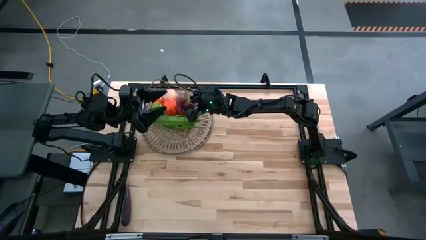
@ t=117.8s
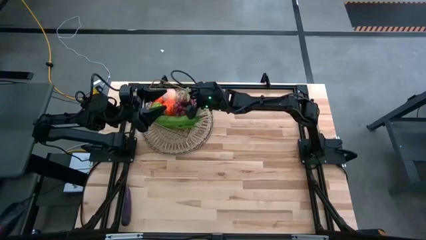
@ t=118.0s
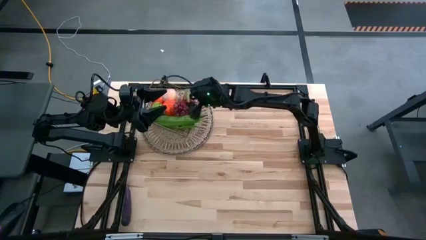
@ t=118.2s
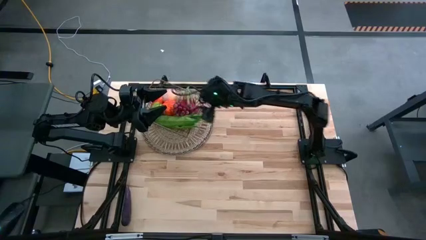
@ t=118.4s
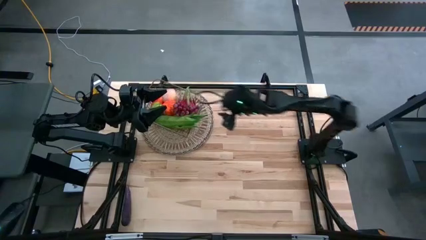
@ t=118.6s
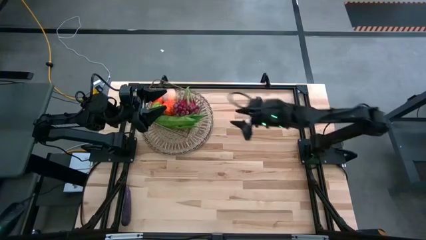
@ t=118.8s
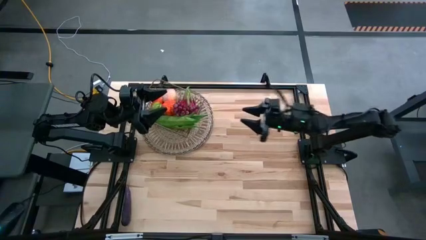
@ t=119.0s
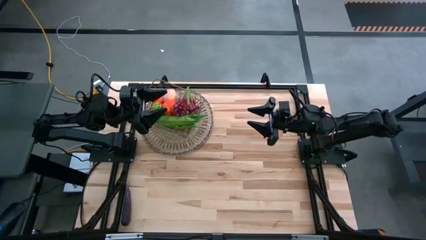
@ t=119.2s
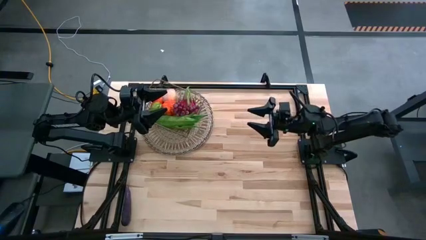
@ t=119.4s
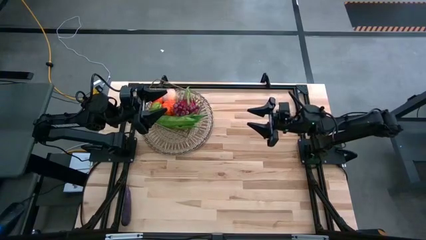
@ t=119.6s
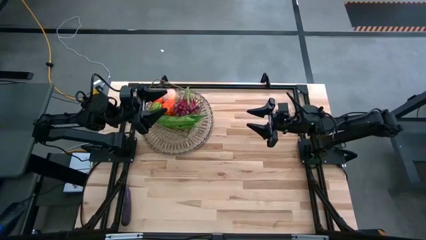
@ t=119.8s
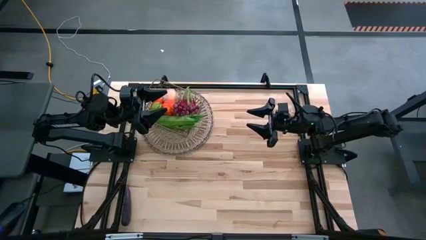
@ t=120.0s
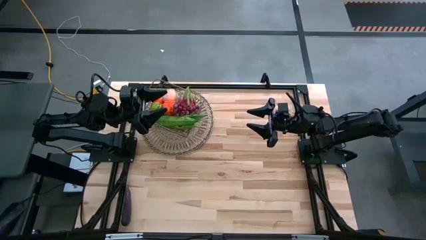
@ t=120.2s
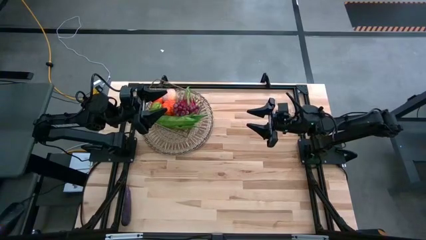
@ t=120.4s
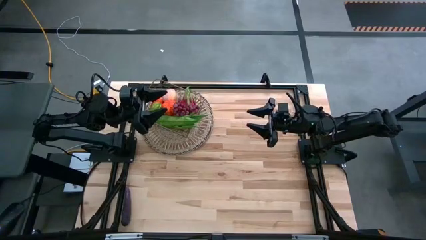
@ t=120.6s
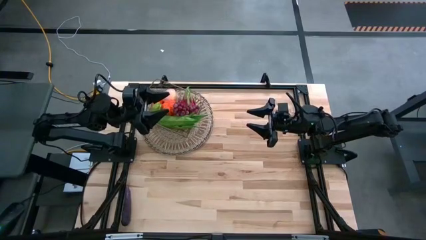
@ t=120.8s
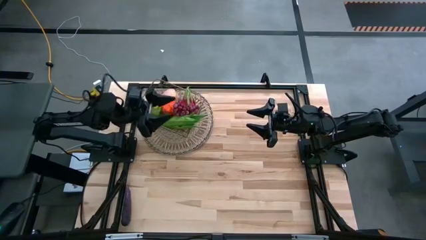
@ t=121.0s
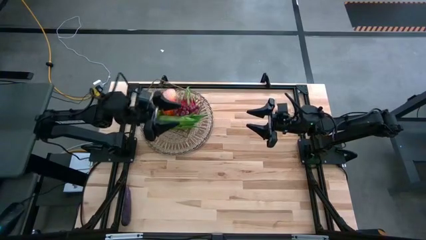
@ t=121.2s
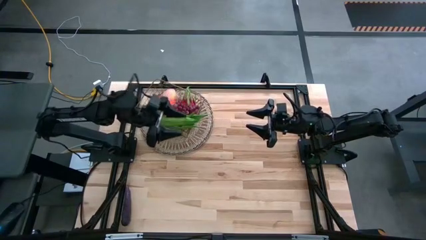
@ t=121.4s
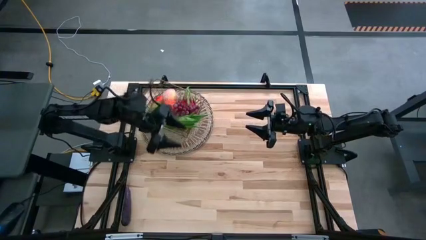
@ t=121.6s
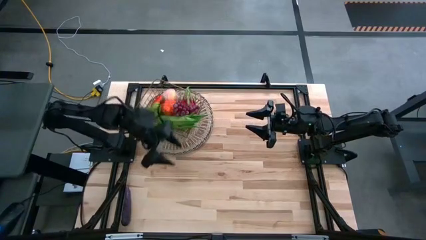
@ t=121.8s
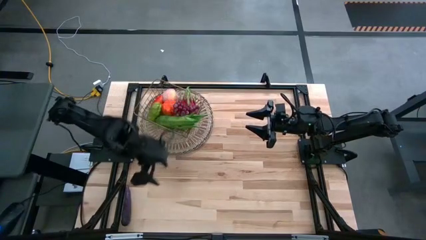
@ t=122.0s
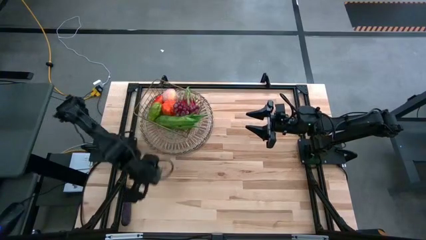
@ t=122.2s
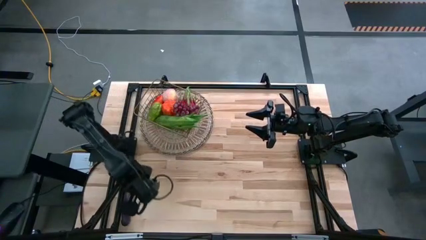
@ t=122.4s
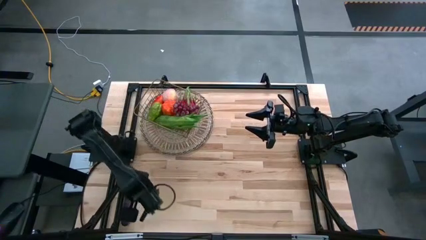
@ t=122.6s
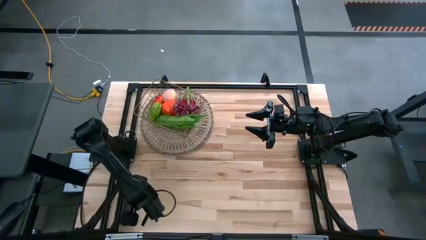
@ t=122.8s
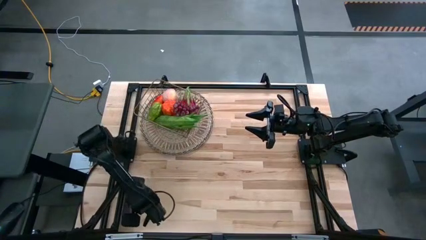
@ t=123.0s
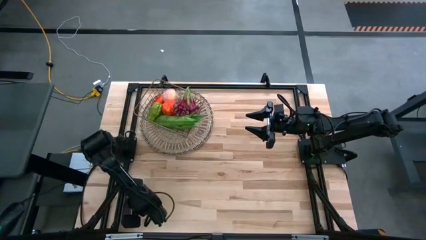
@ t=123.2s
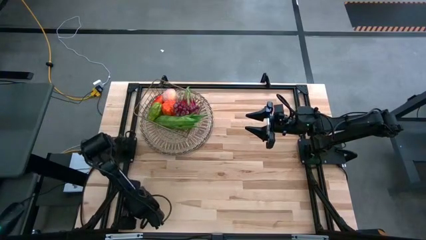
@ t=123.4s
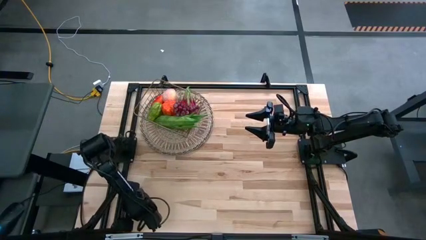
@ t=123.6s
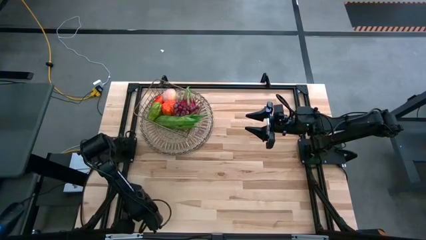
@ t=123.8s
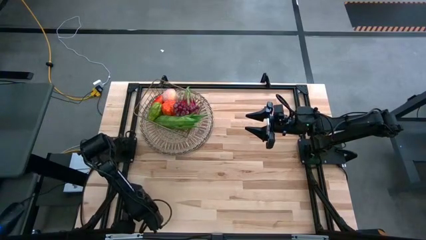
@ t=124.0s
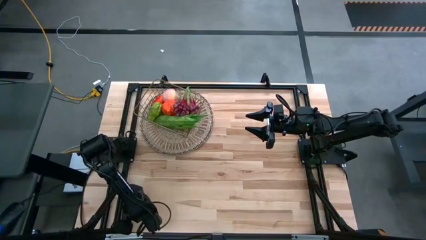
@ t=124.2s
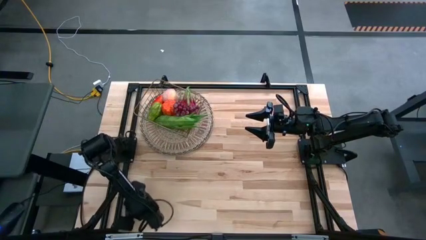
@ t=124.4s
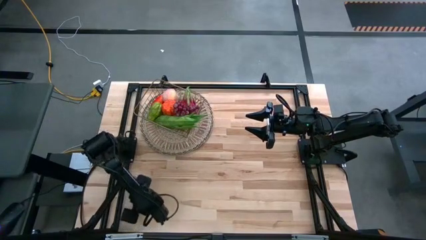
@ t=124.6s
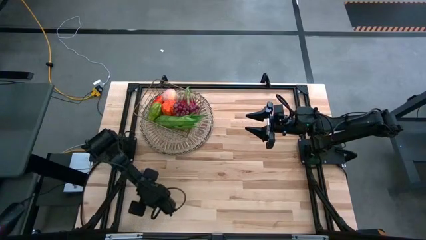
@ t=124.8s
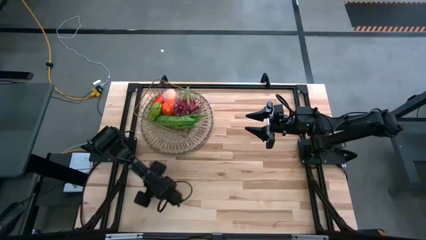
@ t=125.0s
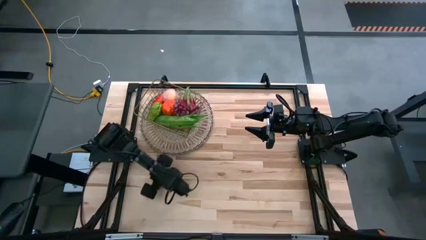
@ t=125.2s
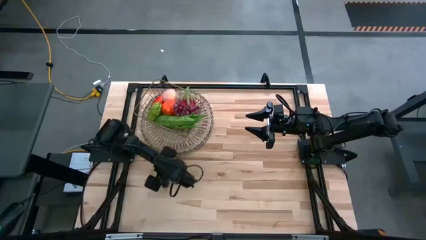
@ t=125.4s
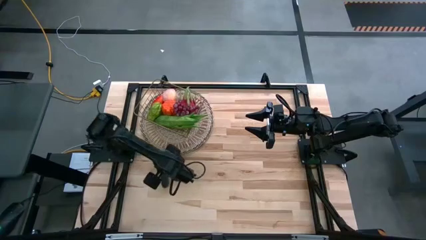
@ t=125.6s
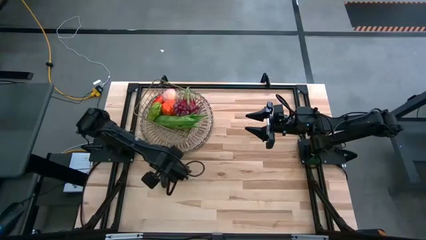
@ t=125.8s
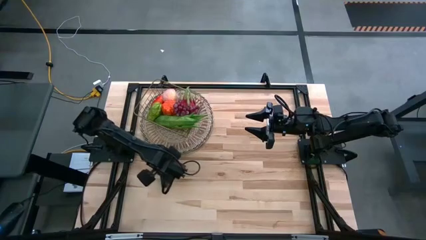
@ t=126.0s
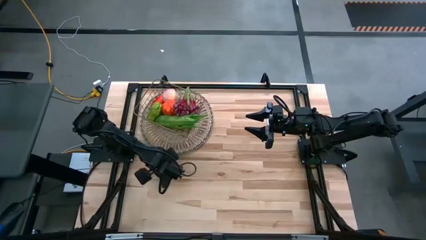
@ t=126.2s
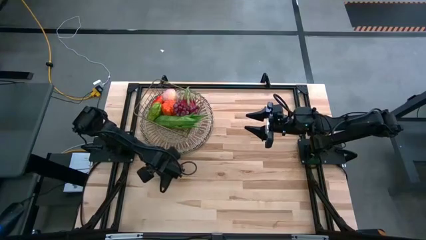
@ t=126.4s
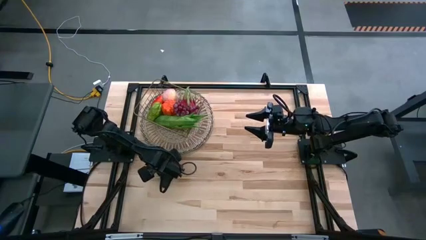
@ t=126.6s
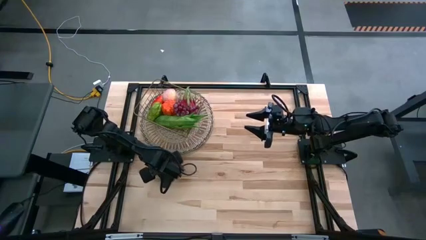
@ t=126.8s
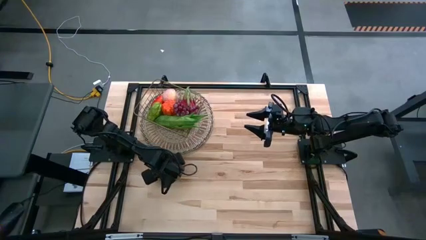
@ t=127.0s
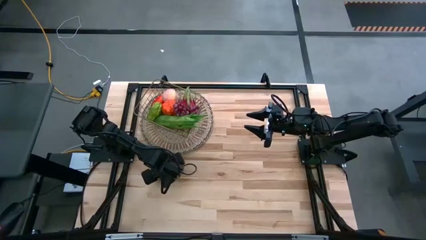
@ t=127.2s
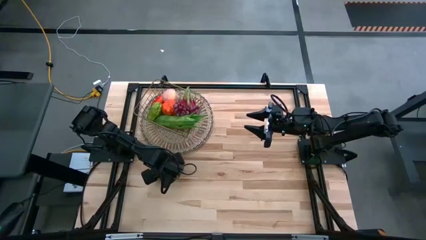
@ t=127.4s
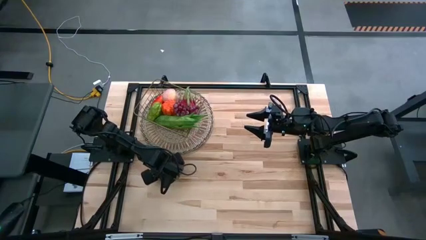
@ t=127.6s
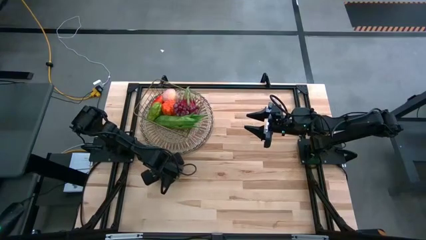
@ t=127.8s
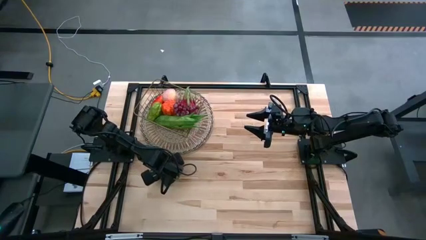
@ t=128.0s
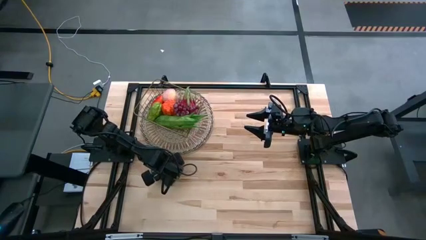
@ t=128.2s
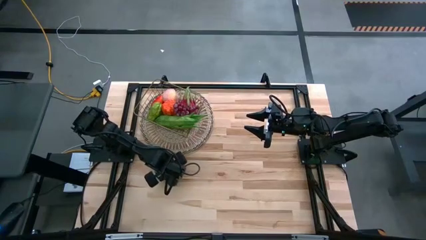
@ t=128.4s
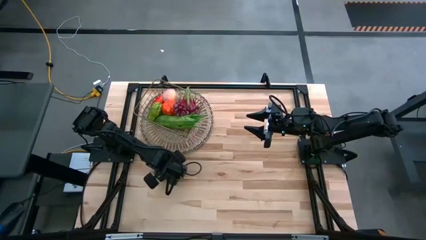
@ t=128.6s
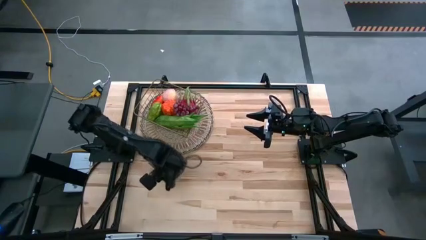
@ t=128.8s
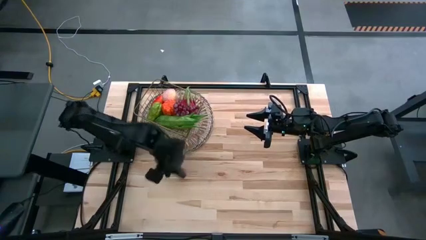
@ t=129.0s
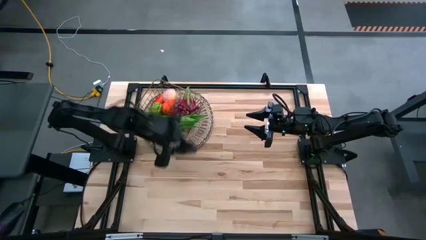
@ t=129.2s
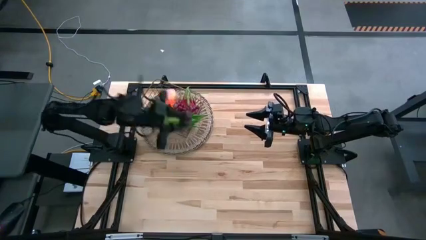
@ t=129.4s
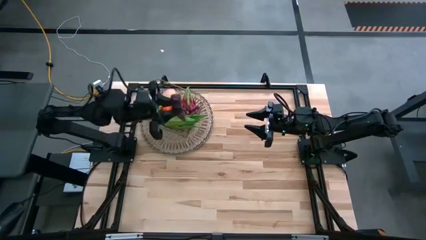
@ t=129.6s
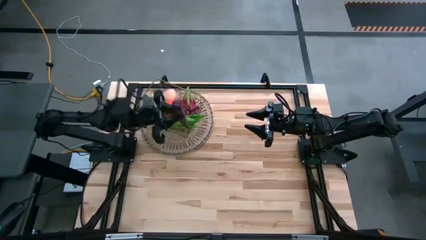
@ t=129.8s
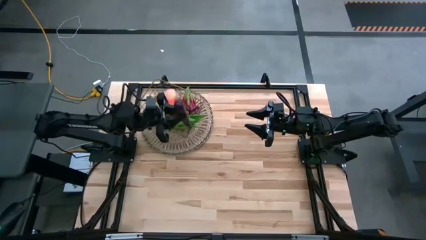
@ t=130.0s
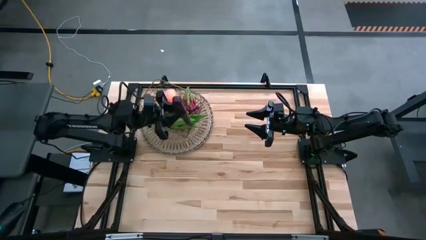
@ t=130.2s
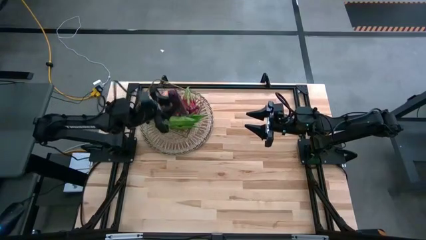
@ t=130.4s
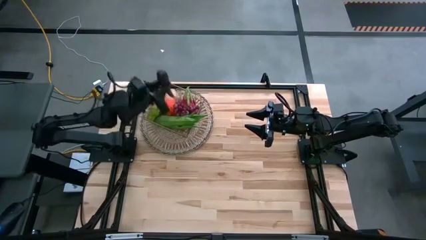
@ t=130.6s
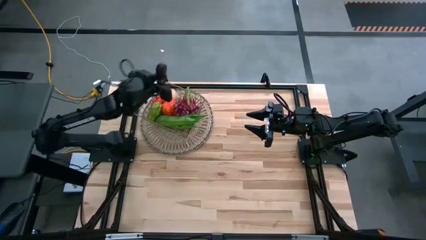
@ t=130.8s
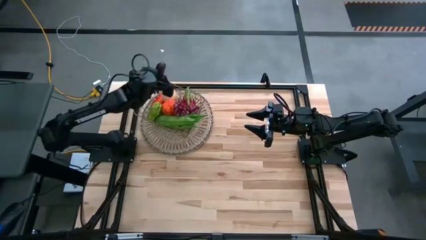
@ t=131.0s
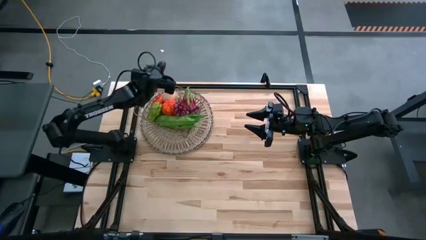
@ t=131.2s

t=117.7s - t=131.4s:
Task: Build produce basket
Put the eggplant into the wire basket

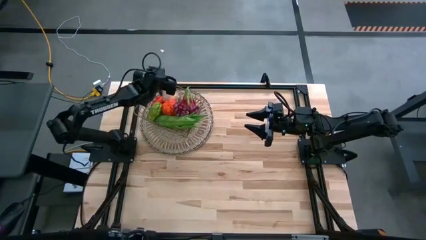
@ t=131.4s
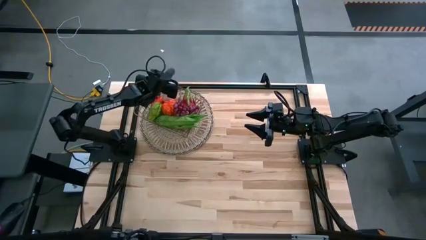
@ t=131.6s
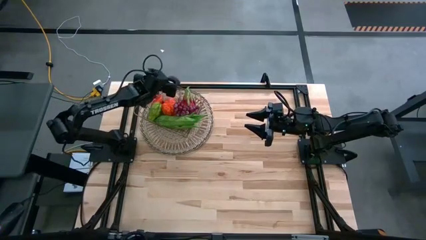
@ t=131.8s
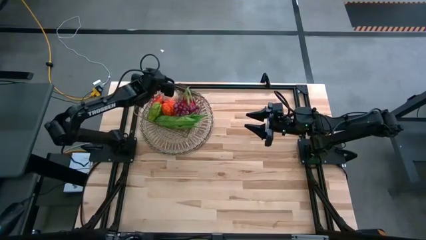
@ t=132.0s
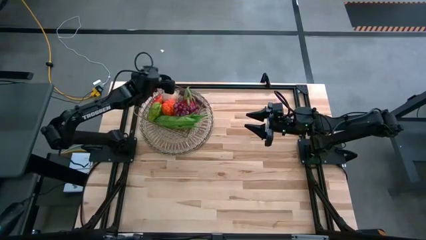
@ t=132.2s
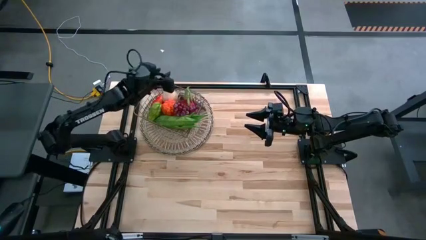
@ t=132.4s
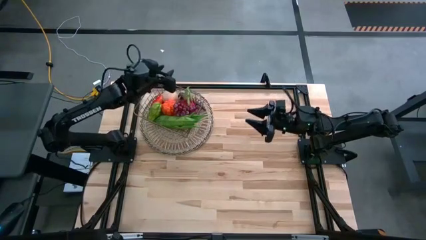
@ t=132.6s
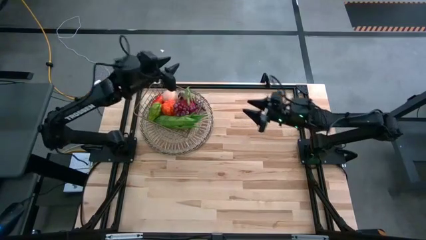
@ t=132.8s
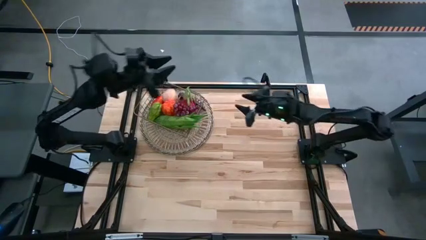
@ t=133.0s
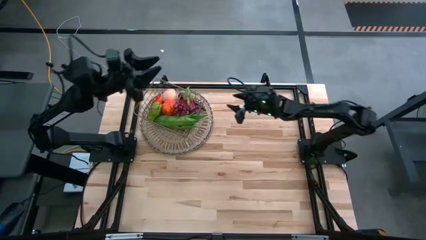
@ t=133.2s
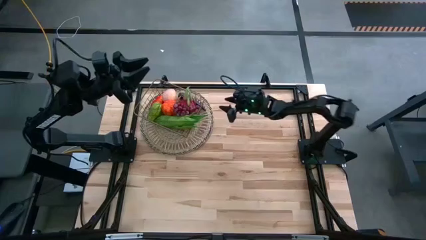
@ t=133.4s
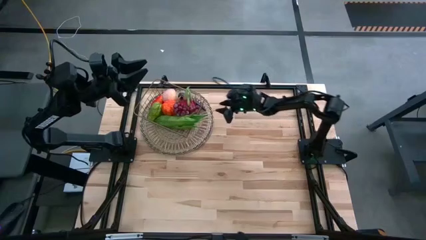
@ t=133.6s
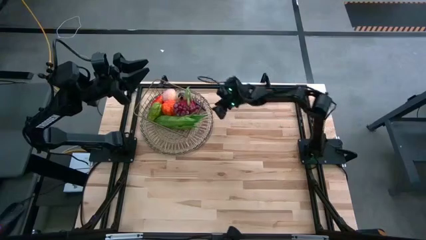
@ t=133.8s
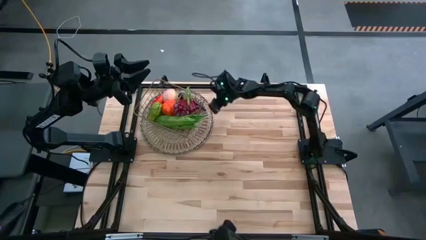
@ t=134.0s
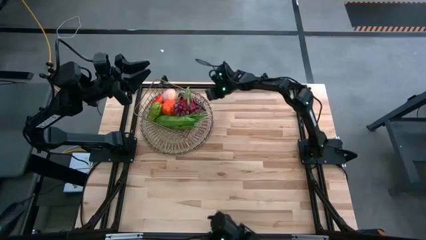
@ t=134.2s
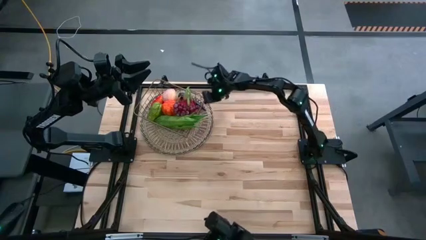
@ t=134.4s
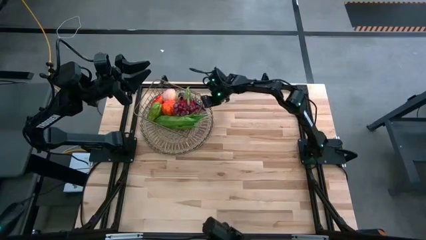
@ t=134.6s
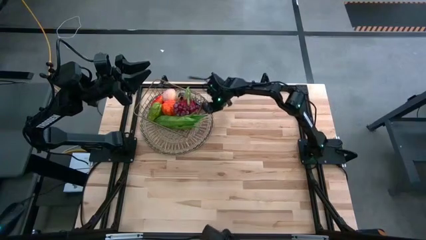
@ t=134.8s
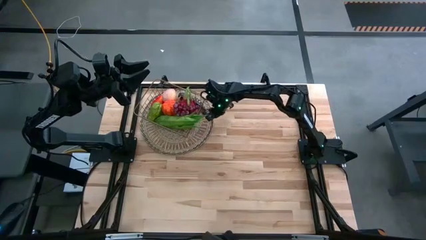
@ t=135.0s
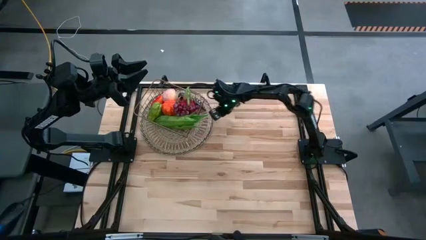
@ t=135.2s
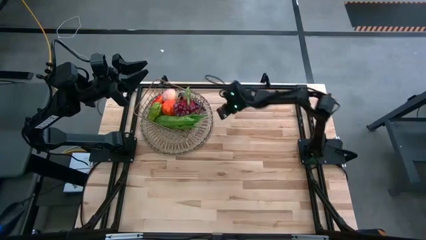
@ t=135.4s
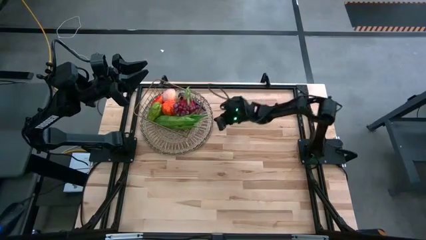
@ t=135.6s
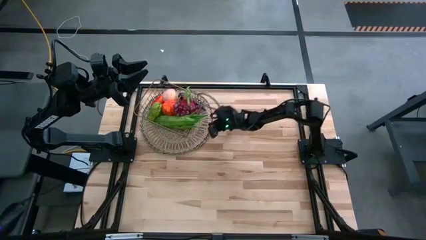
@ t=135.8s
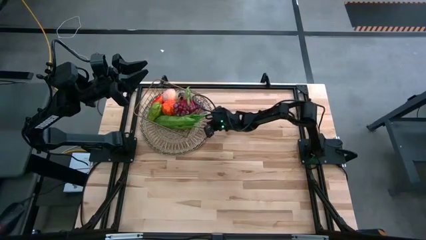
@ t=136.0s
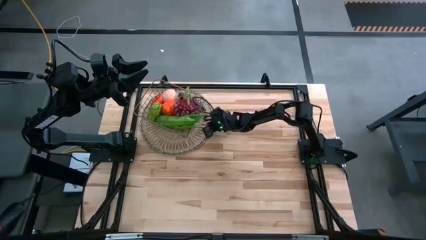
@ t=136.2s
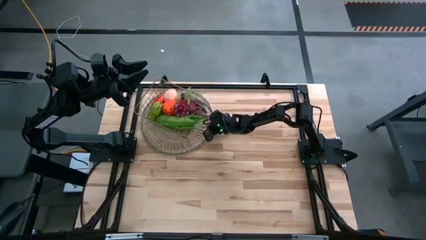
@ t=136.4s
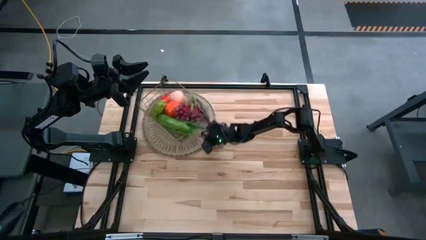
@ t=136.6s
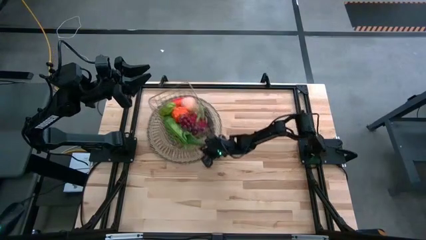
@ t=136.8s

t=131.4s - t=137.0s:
Adjust the tablemat
